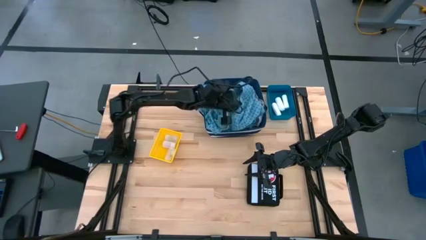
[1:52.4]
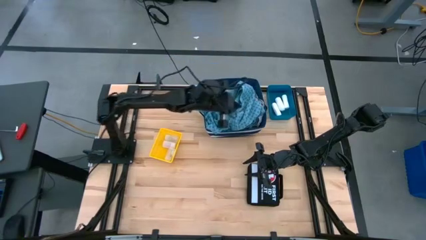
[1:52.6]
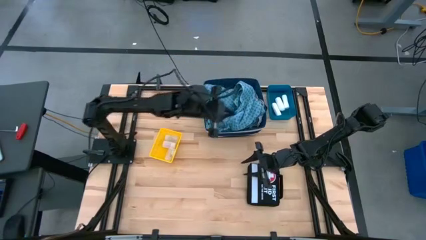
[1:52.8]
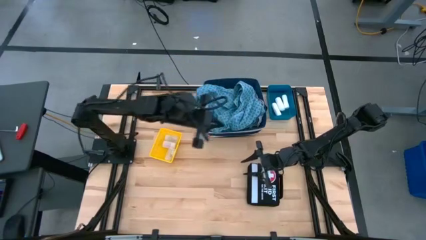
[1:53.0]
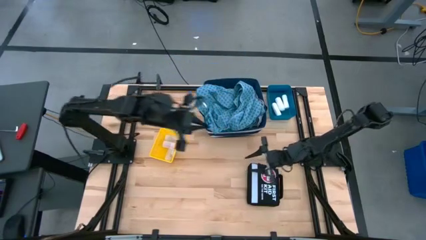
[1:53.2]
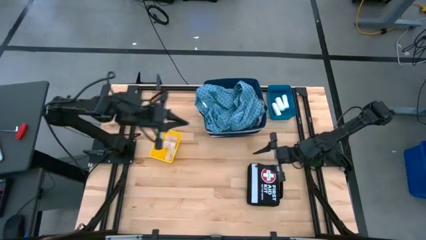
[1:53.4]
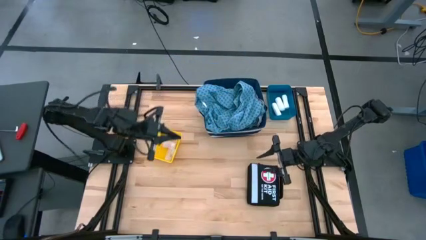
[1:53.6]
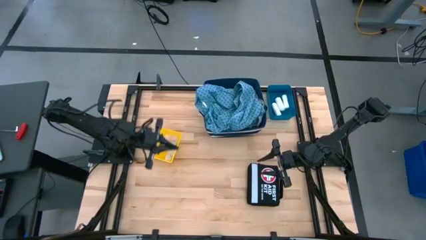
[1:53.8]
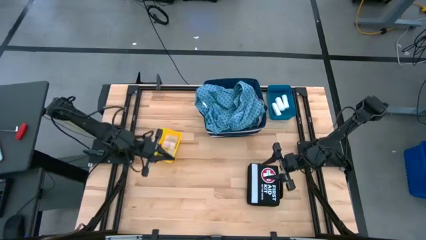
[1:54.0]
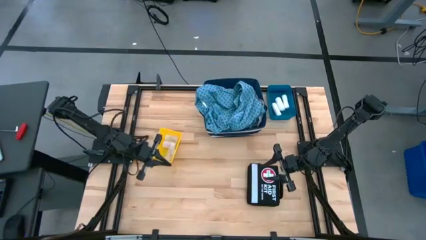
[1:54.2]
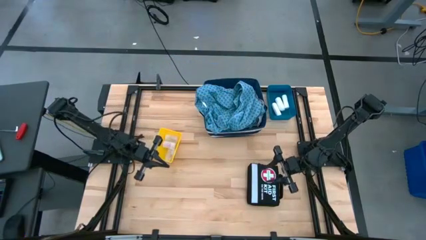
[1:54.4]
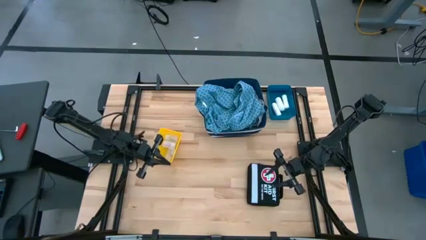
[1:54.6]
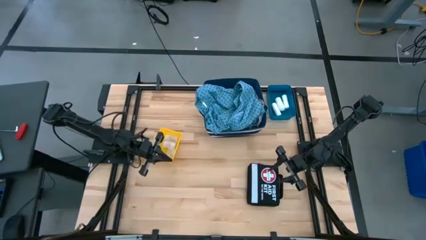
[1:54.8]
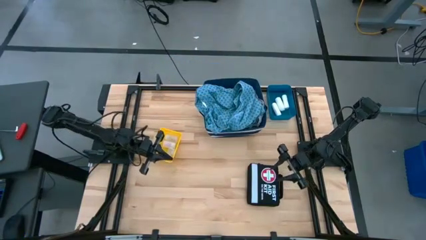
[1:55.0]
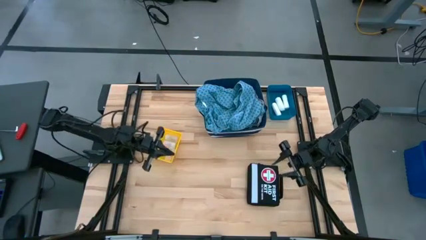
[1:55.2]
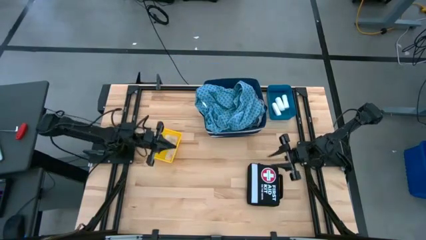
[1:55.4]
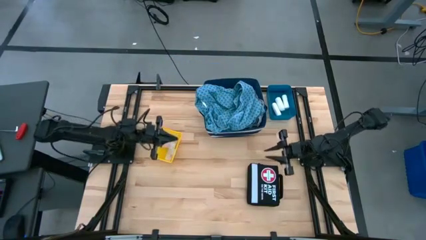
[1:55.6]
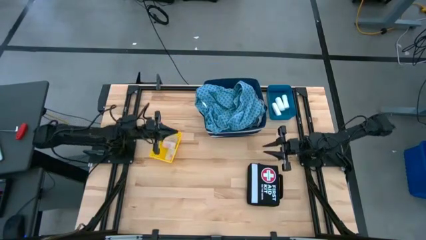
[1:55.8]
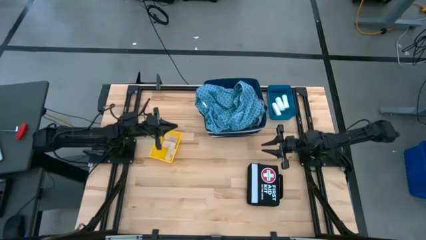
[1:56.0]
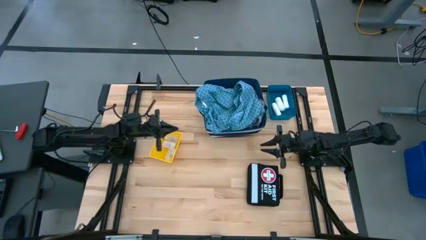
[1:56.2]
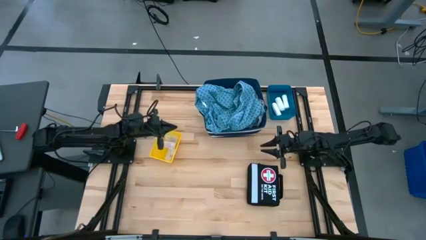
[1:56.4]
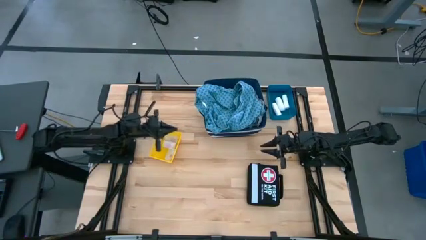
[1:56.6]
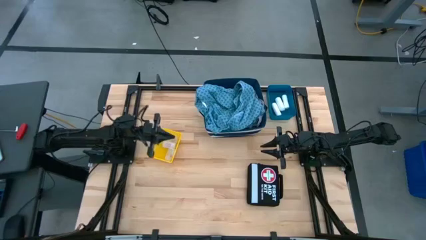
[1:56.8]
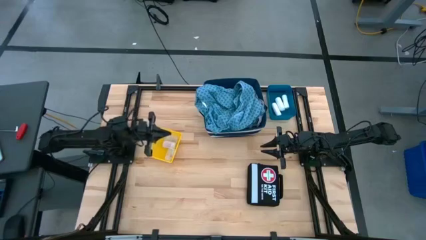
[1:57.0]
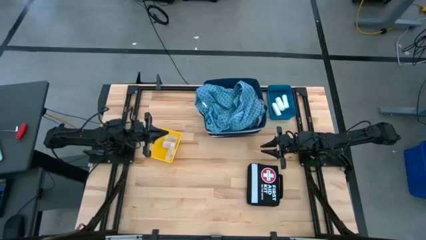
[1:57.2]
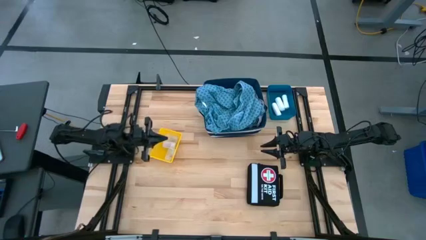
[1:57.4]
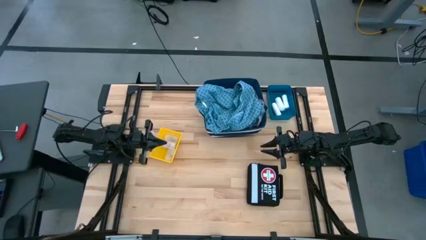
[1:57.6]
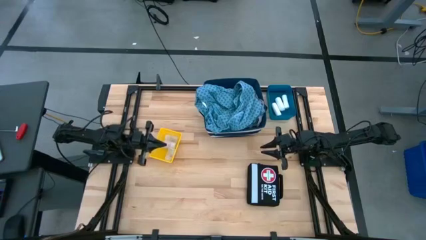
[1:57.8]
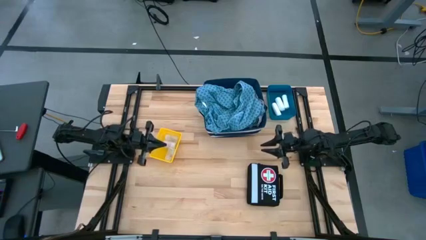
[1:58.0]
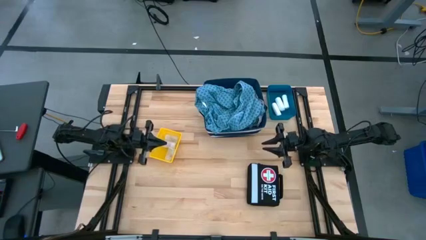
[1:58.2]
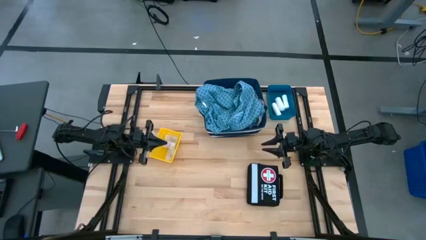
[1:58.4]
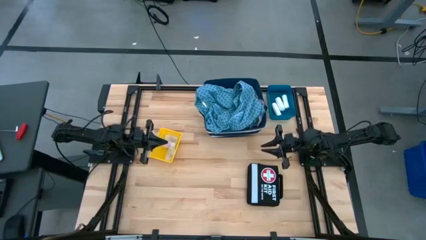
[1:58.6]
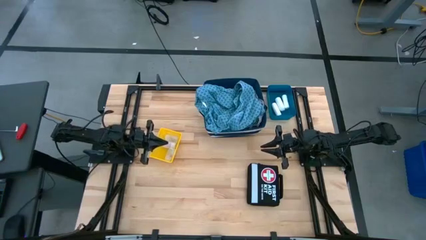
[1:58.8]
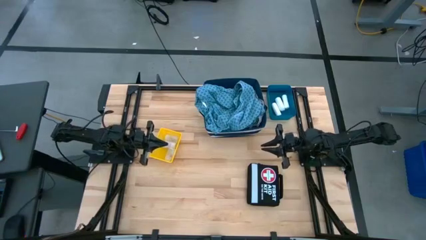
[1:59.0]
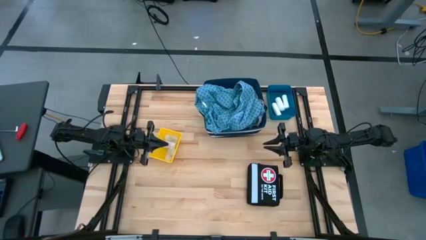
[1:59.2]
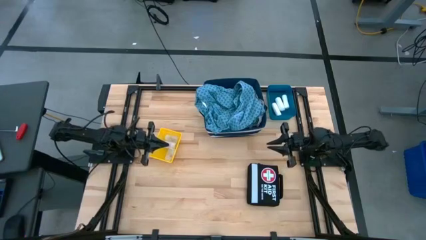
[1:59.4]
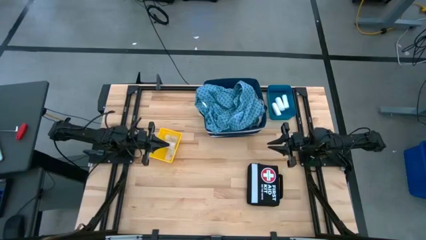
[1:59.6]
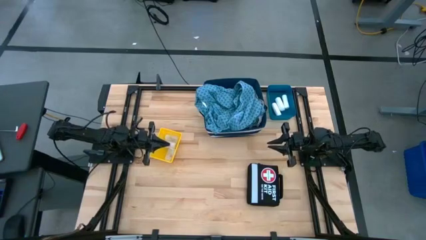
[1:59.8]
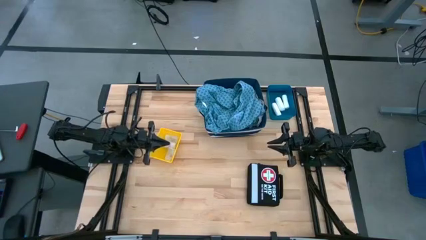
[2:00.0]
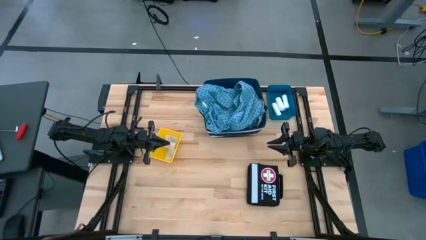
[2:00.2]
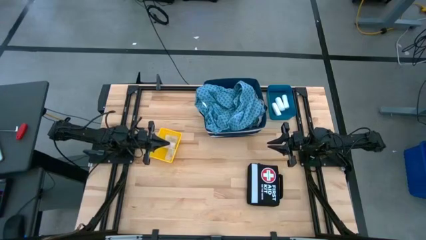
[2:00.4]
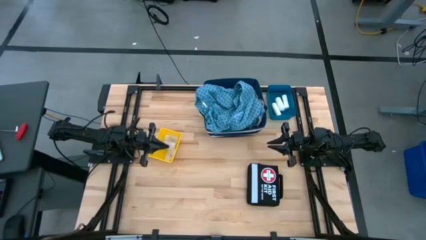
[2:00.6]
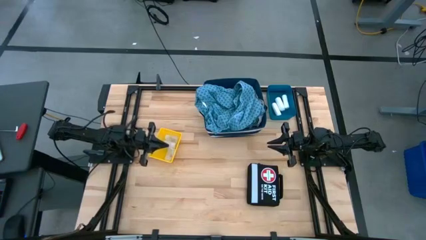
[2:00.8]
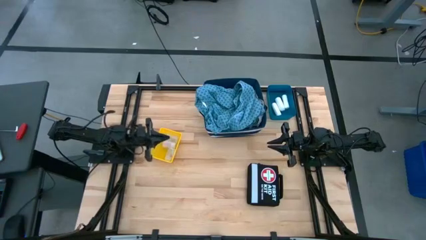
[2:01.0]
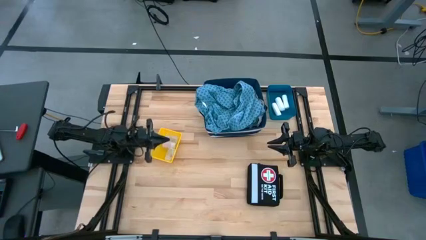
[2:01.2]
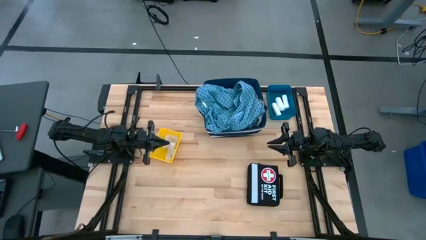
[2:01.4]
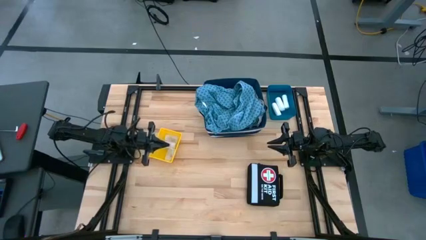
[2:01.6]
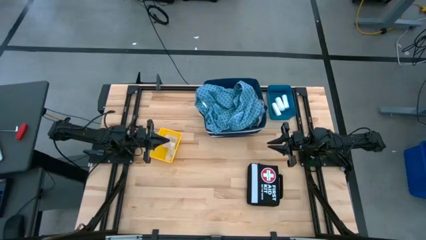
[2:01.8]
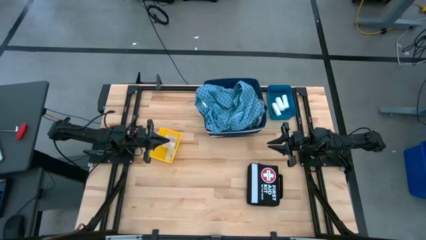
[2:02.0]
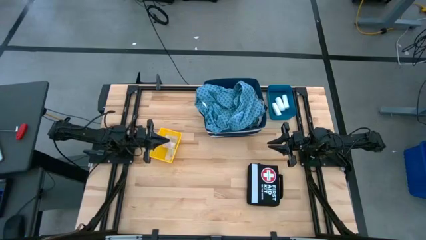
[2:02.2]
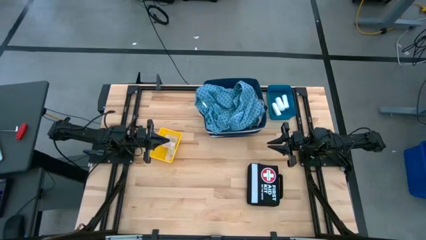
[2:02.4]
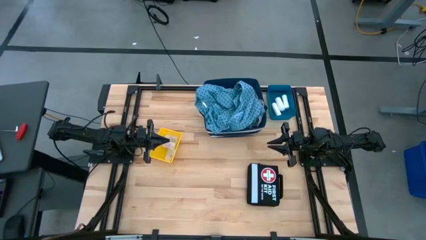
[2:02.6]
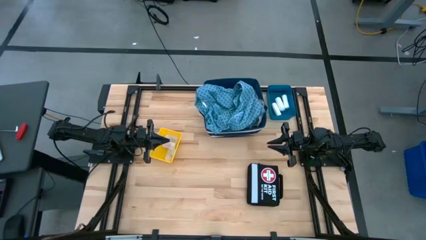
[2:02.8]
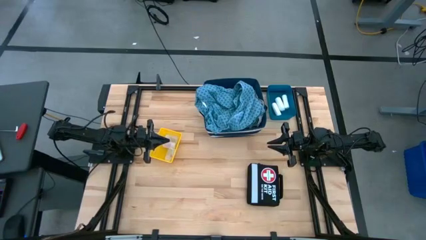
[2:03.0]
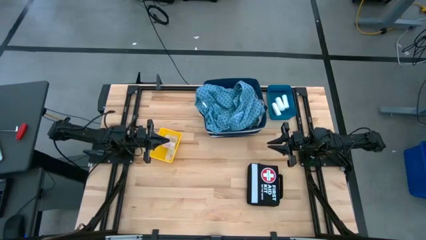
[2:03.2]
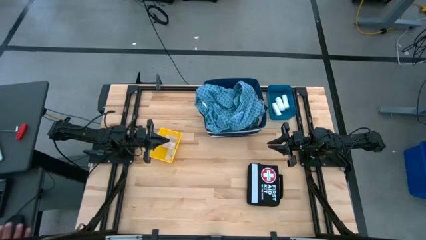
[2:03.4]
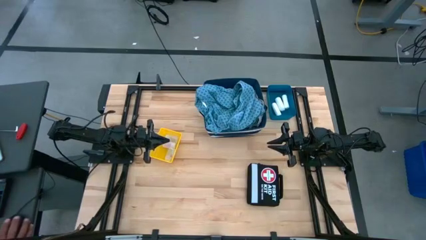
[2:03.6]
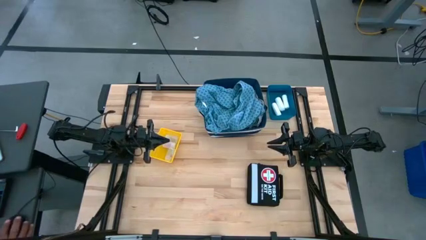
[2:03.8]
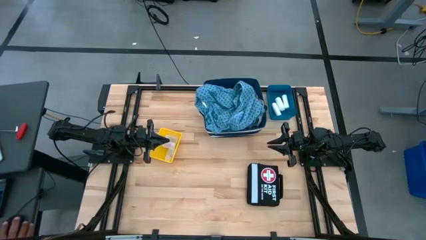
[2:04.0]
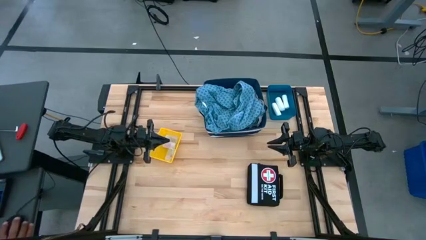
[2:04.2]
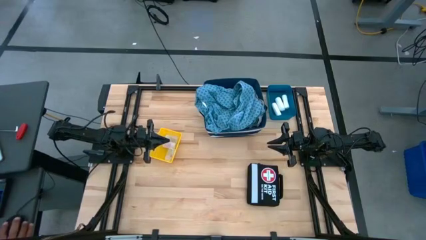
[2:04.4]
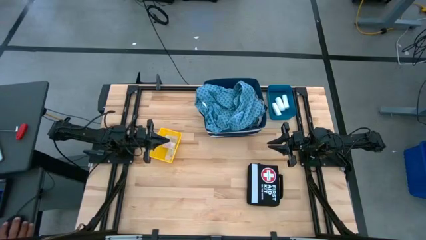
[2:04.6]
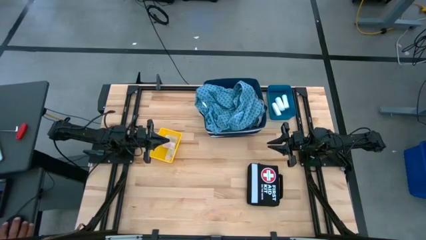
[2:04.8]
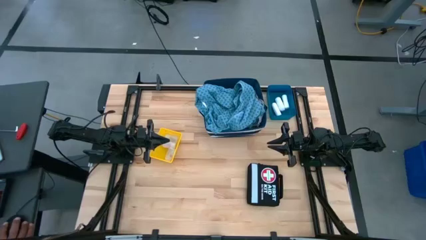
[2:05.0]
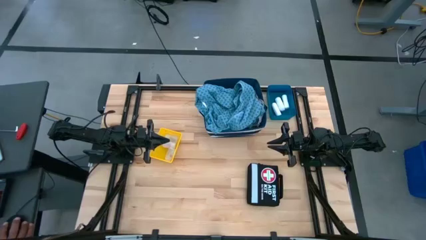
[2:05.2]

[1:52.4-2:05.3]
Task: Pick & place medical supplies in basket/bin
Return to Home Position

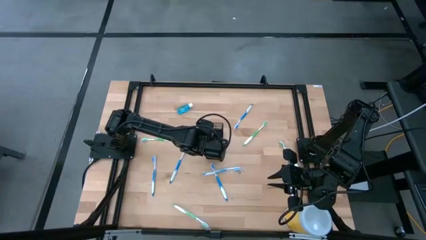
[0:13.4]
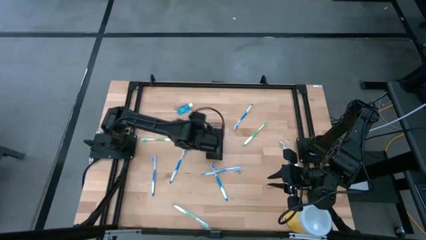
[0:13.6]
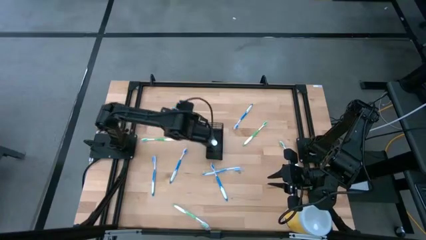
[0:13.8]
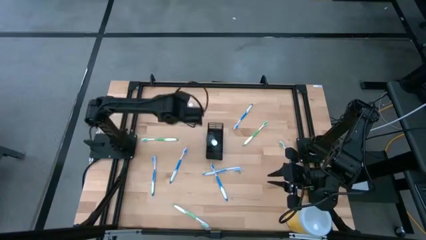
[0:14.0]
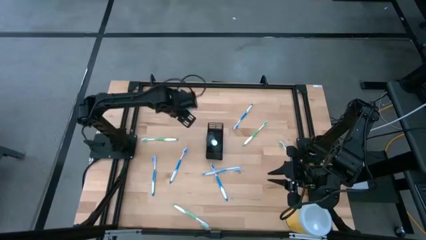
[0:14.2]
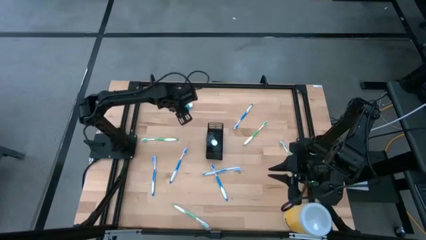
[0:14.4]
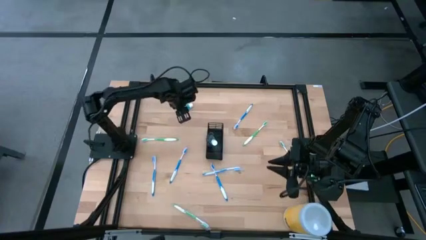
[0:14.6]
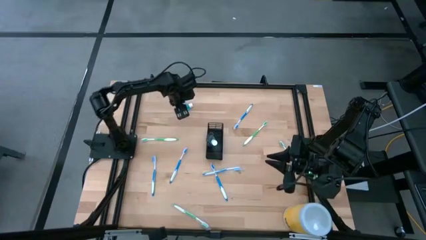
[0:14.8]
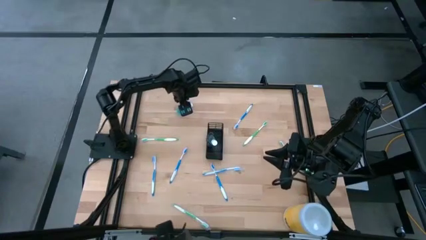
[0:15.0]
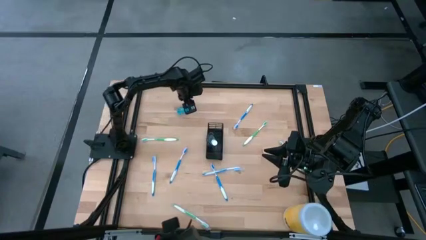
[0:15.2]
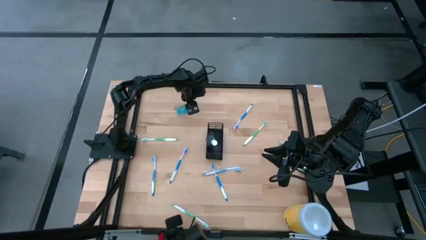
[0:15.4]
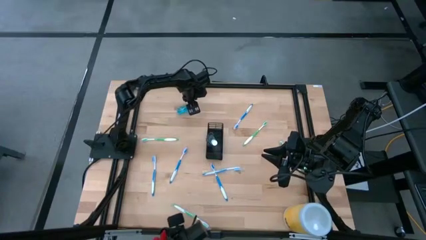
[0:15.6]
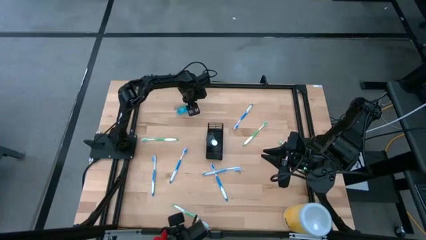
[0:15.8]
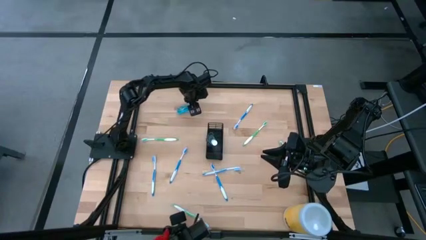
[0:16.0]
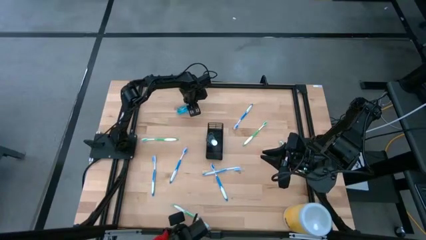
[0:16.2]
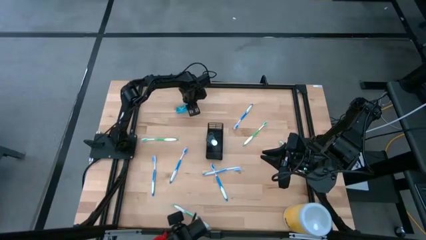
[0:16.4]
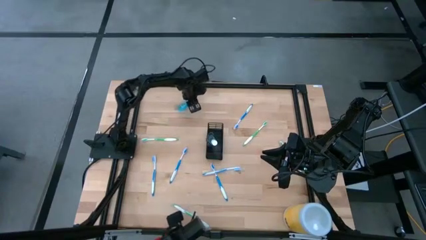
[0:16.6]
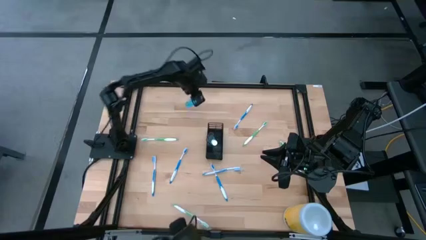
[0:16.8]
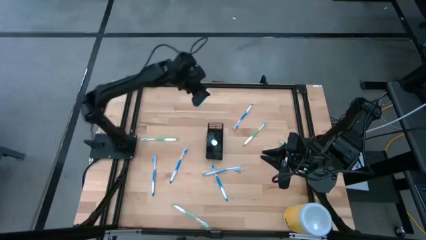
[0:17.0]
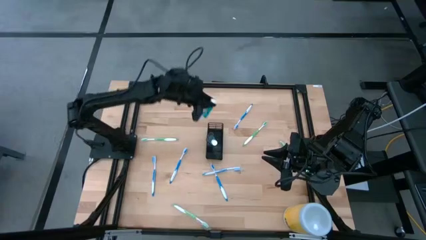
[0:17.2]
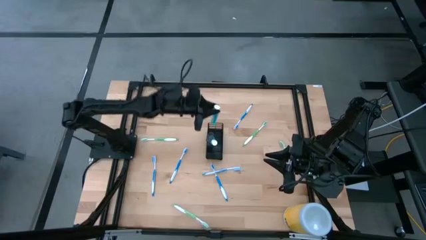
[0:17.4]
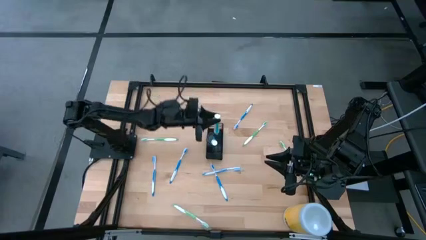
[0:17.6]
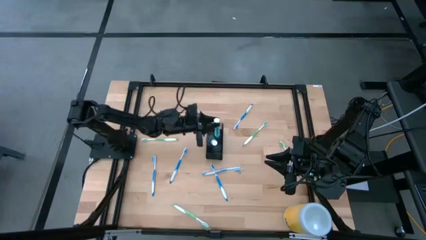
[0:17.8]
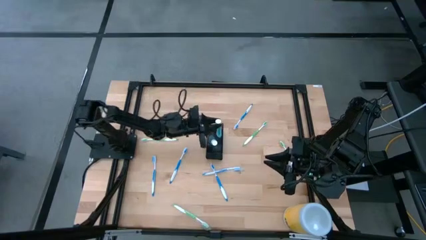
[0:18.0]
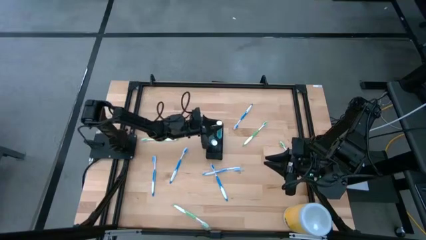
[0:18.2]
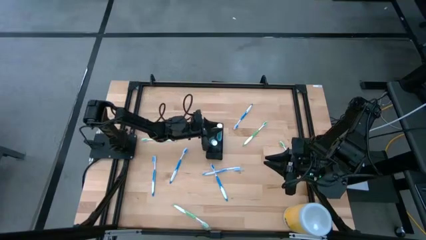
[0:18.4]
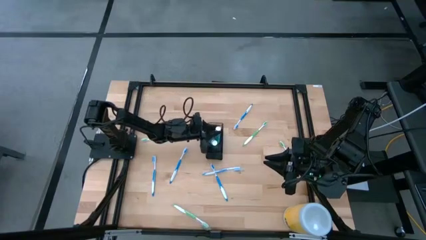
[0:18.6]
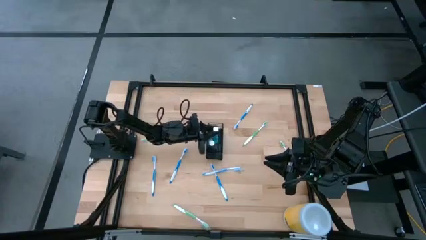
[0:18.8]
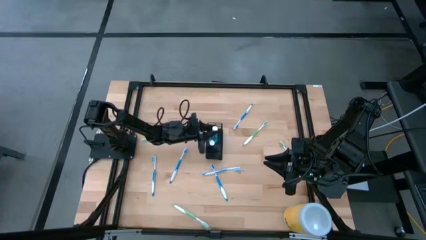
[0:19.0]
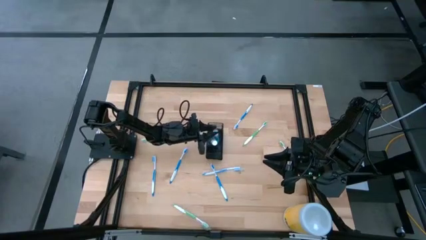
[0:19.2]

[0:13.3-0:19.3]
Task: Pick & Place toothbrushing station
Put the blue mouthwash bottle into the black organizer
